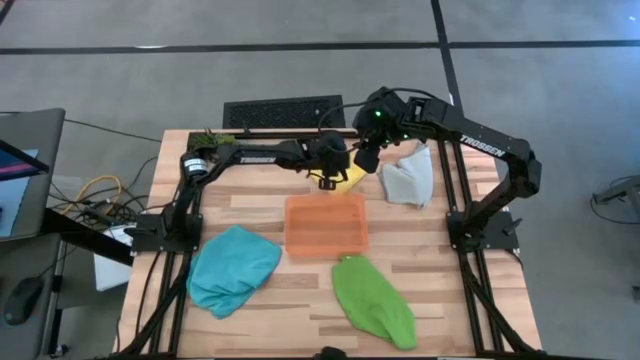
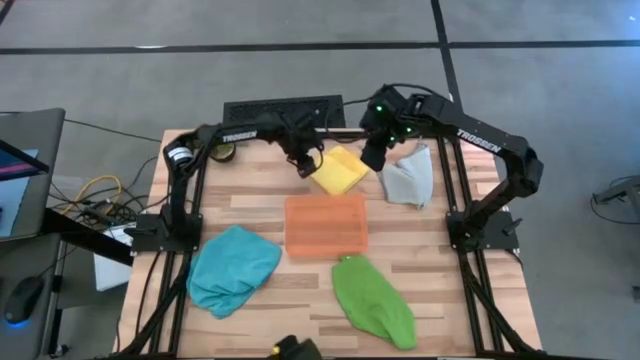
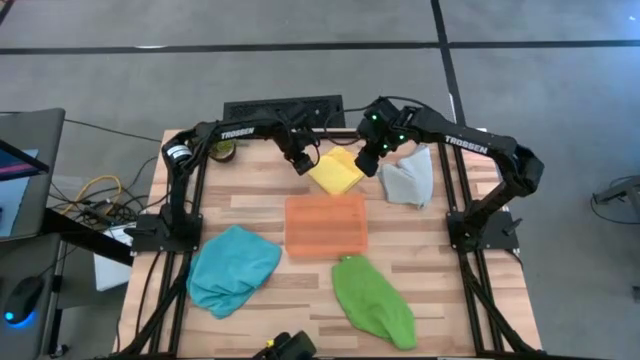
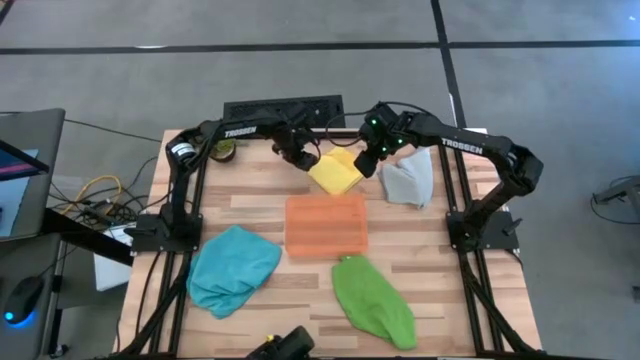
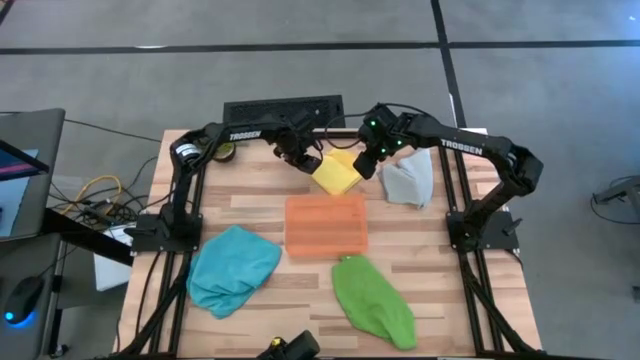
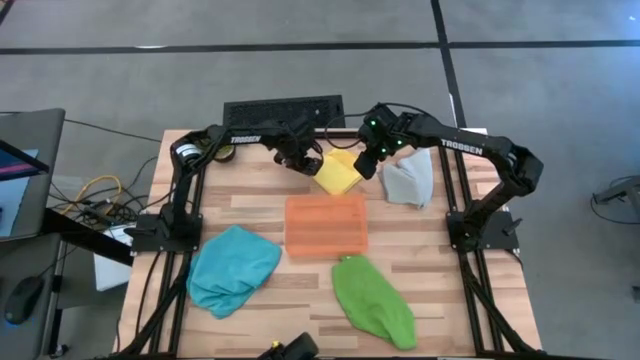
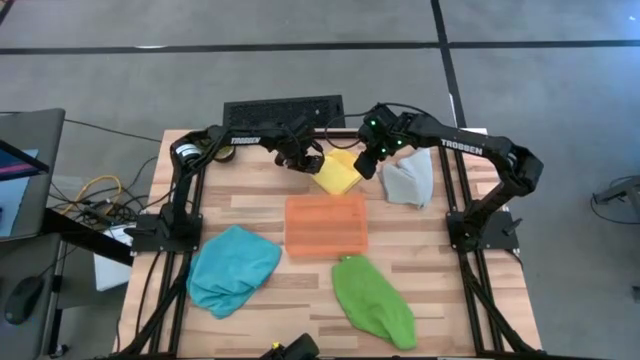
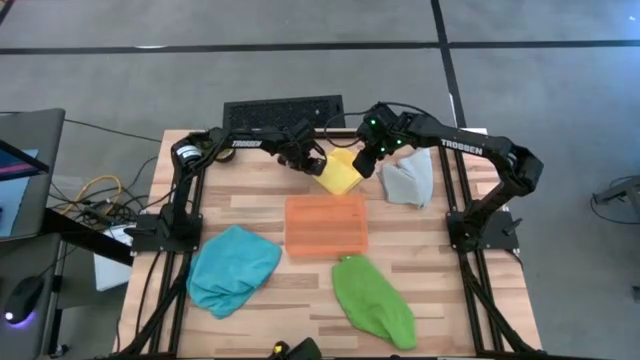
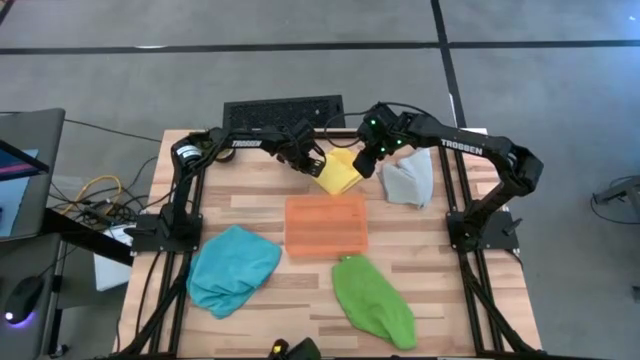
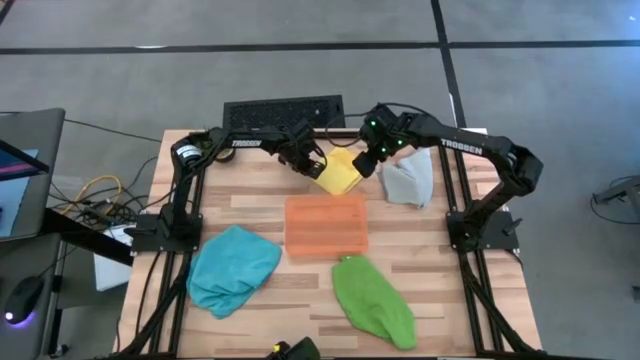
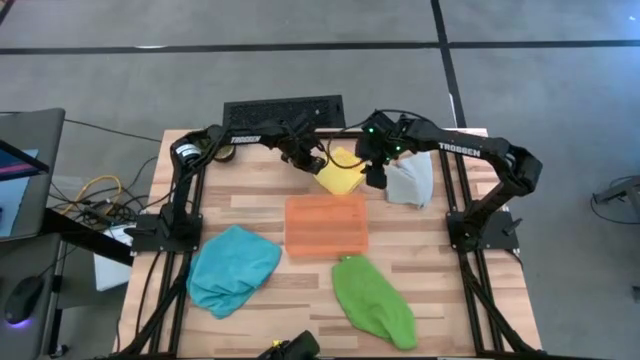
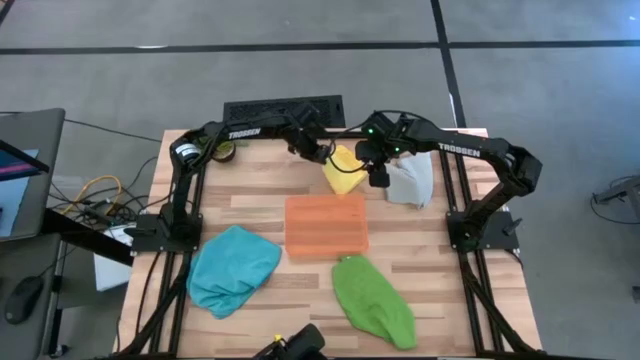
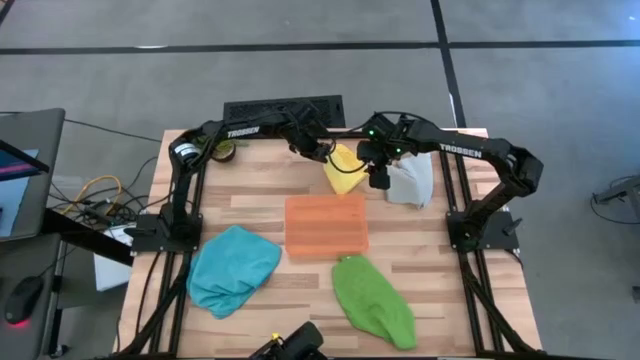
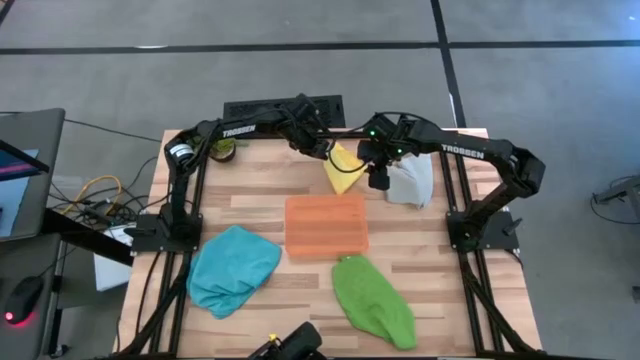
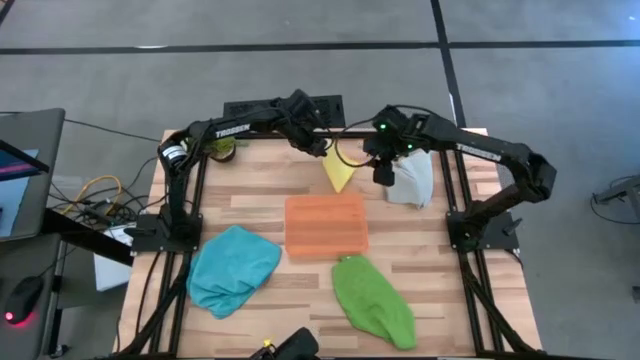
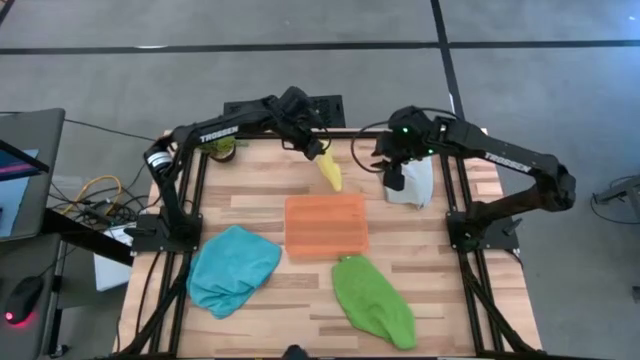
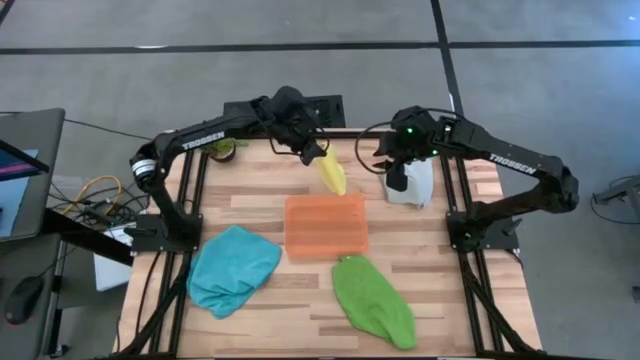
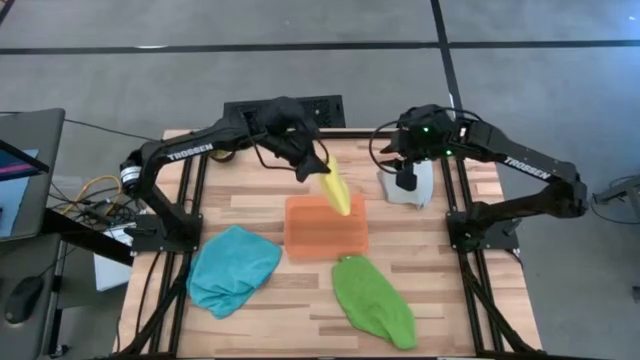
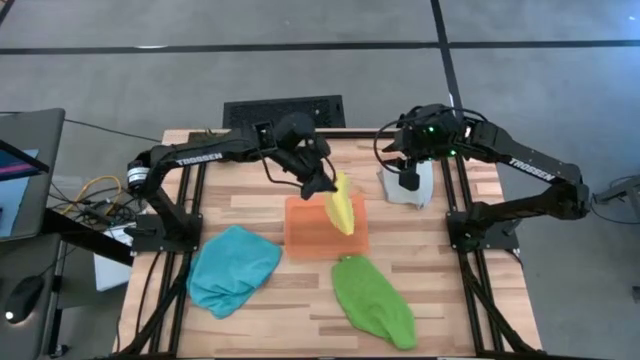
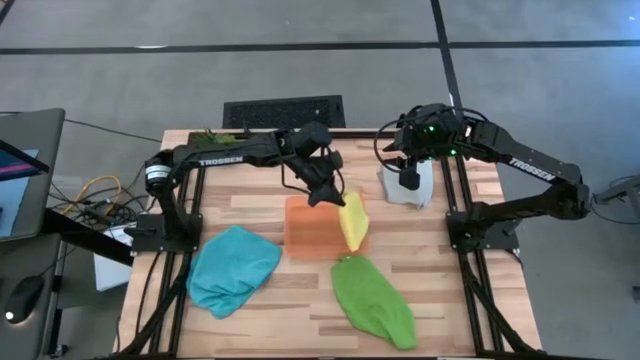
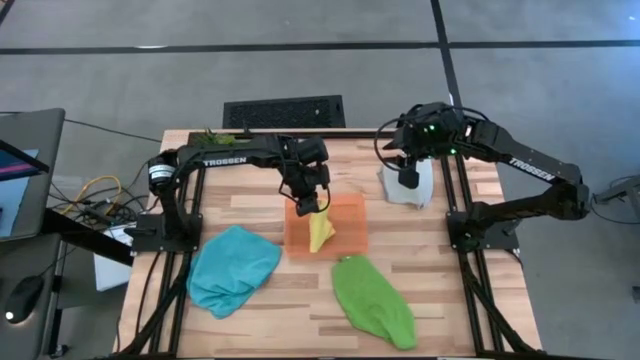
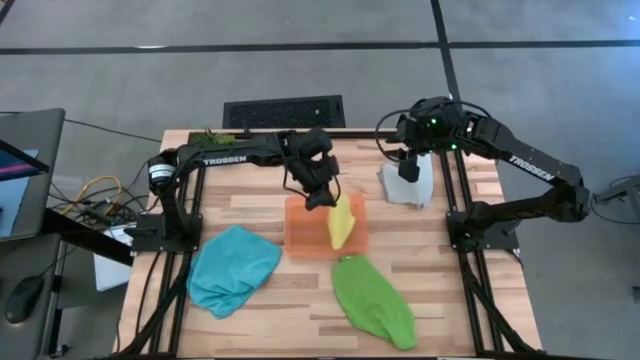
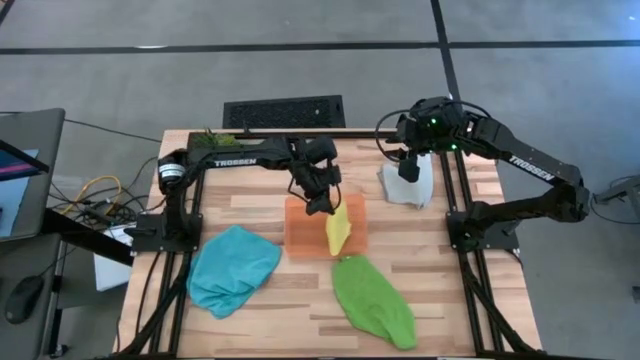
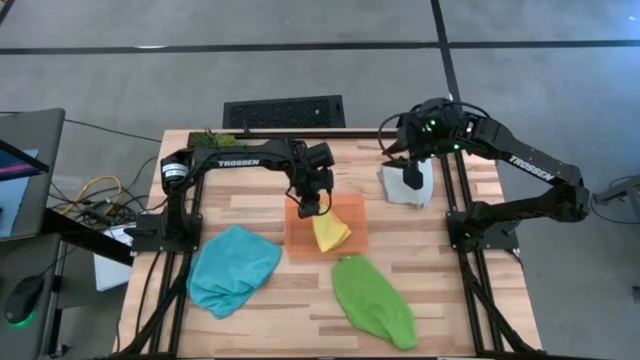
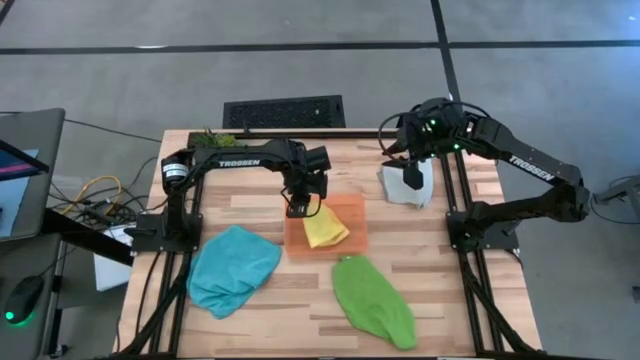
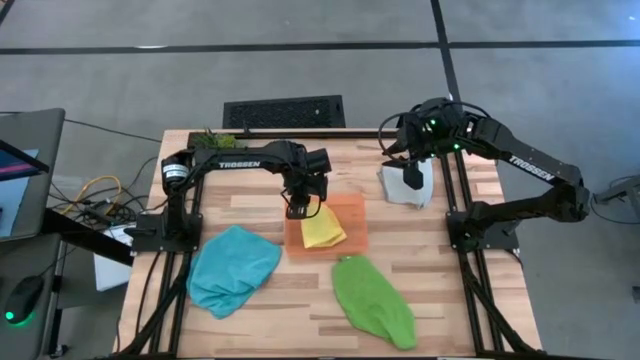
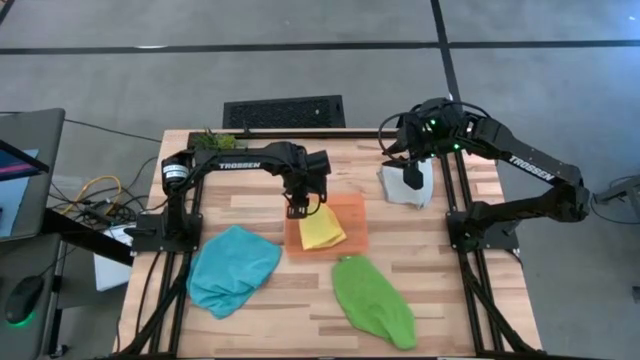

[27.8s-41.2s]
Task: Sort microfiber towel by color & place in baskets
Put the yellow towel into the orange bin
